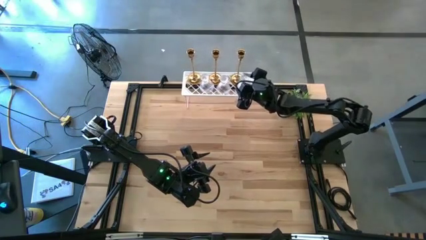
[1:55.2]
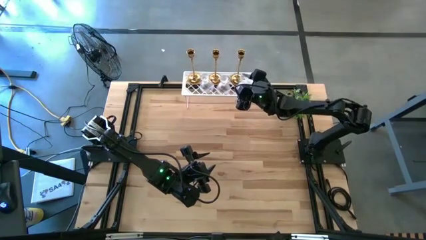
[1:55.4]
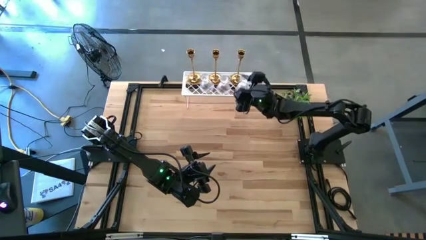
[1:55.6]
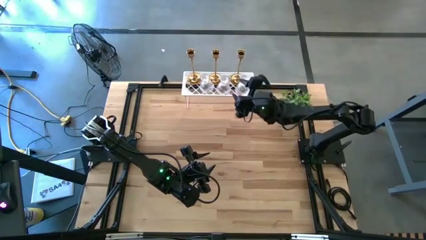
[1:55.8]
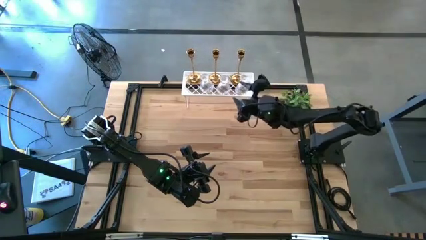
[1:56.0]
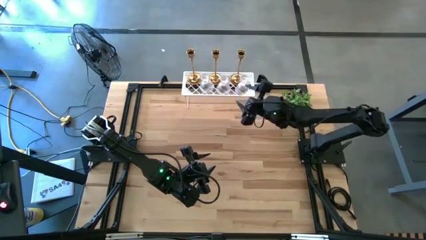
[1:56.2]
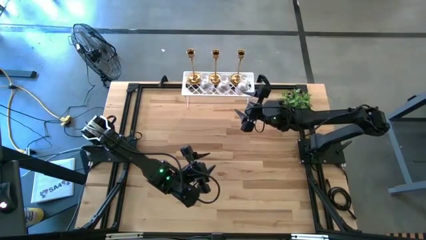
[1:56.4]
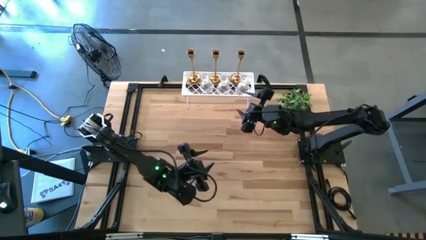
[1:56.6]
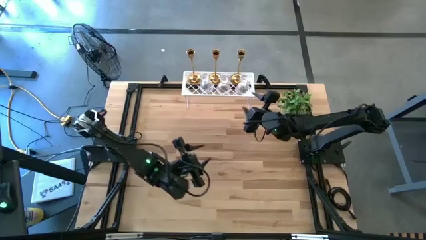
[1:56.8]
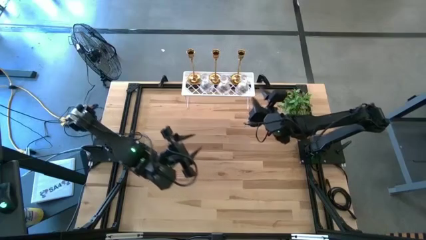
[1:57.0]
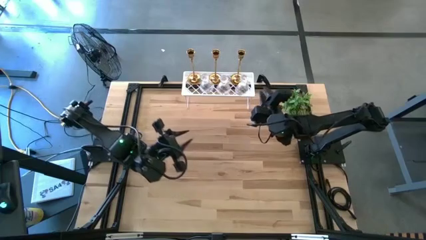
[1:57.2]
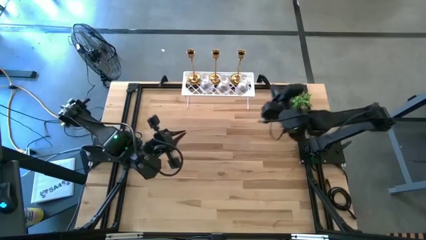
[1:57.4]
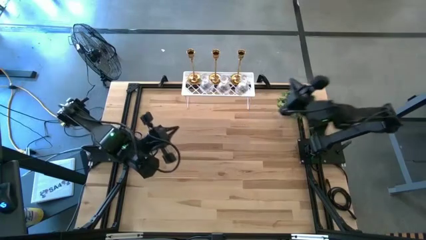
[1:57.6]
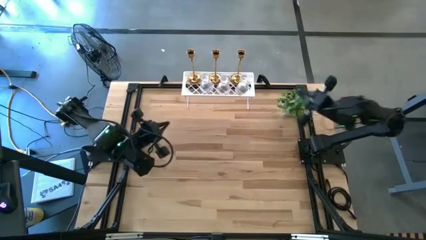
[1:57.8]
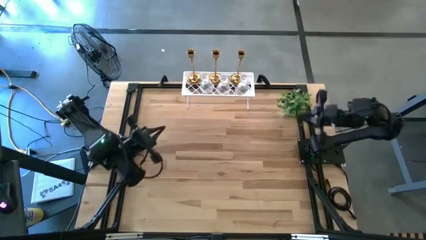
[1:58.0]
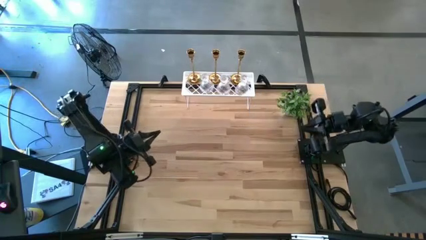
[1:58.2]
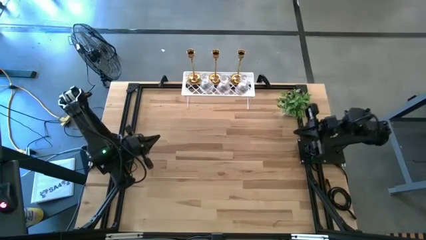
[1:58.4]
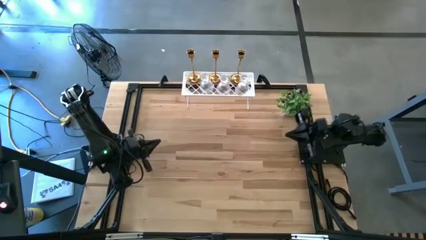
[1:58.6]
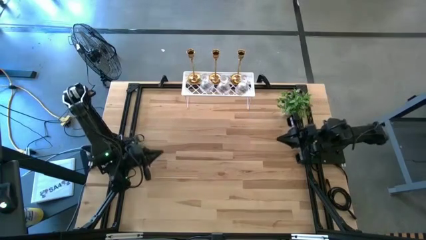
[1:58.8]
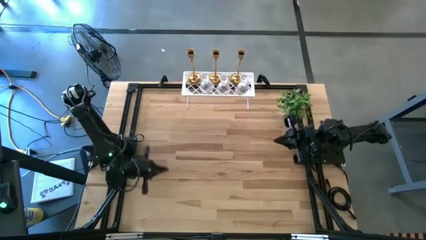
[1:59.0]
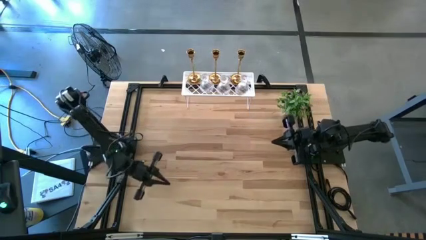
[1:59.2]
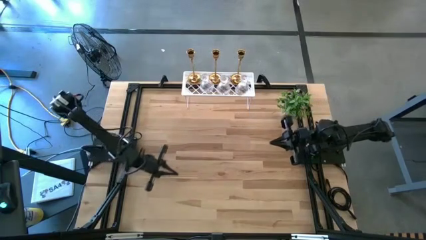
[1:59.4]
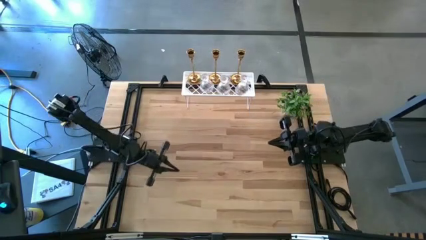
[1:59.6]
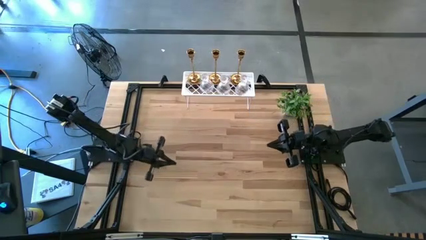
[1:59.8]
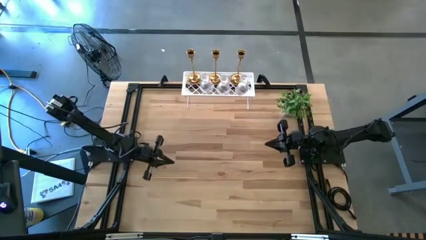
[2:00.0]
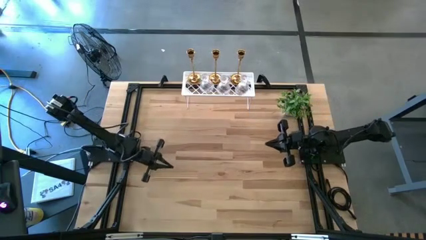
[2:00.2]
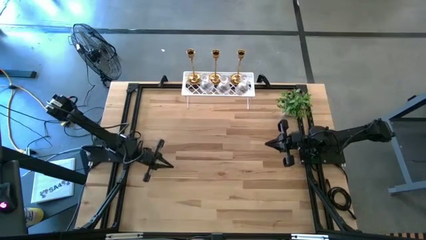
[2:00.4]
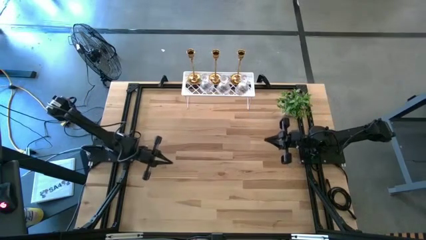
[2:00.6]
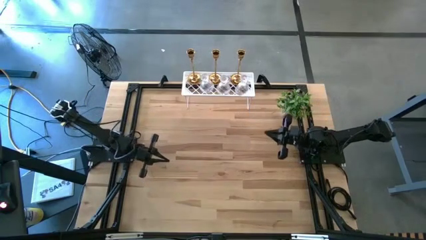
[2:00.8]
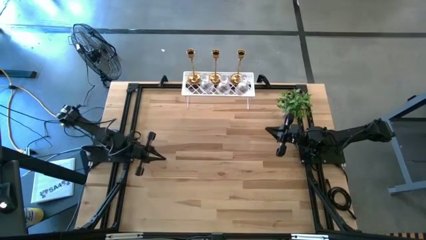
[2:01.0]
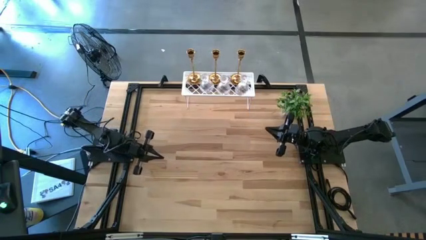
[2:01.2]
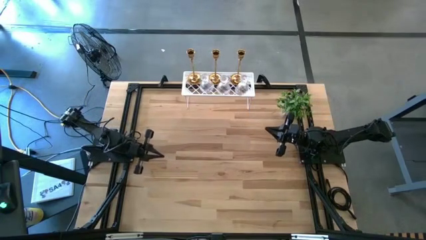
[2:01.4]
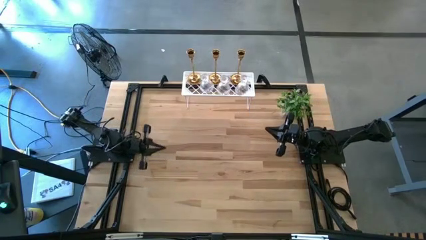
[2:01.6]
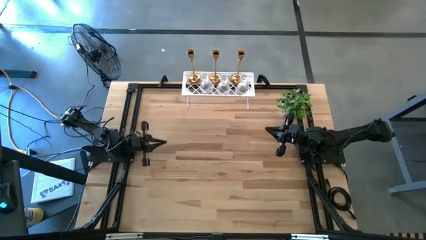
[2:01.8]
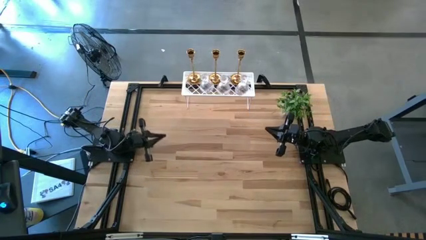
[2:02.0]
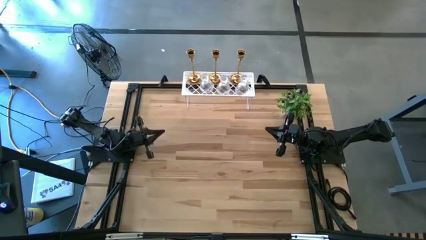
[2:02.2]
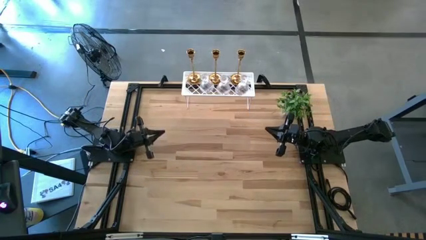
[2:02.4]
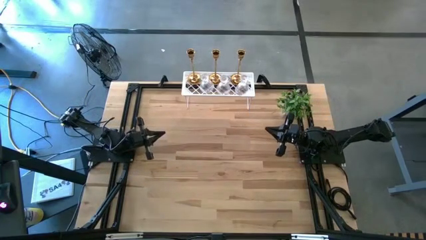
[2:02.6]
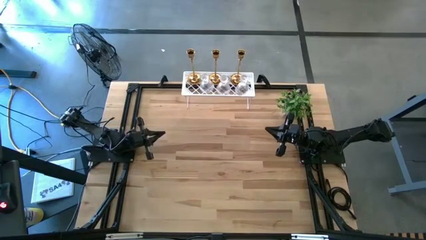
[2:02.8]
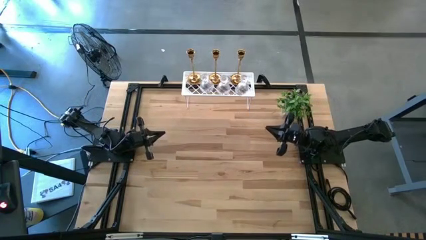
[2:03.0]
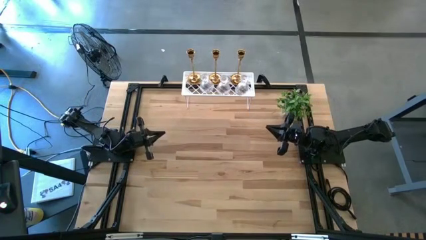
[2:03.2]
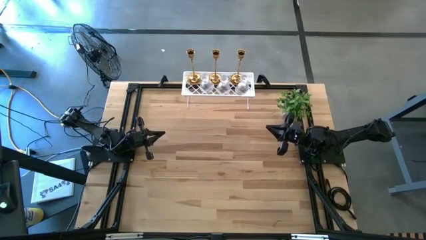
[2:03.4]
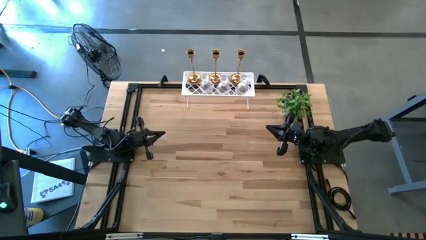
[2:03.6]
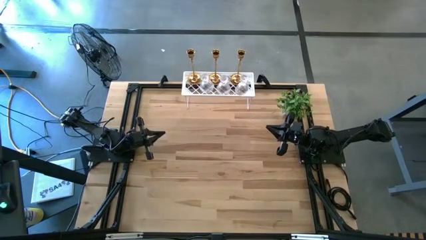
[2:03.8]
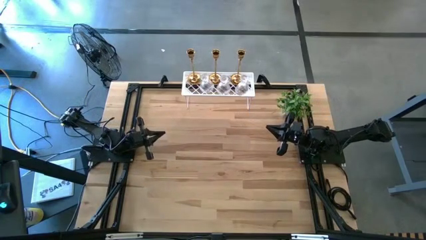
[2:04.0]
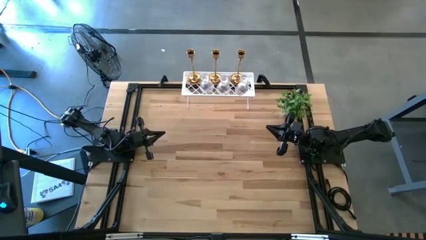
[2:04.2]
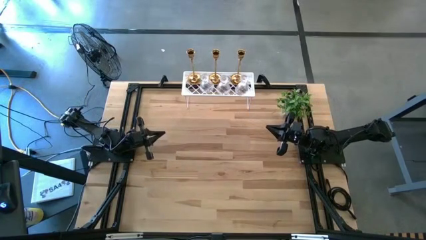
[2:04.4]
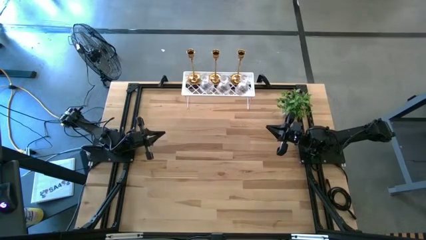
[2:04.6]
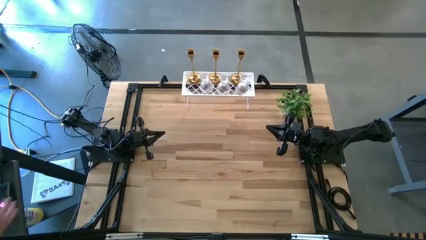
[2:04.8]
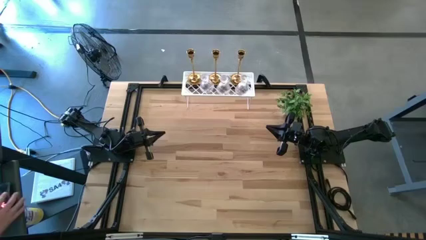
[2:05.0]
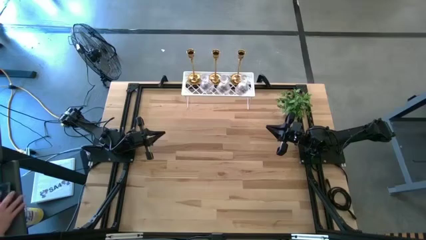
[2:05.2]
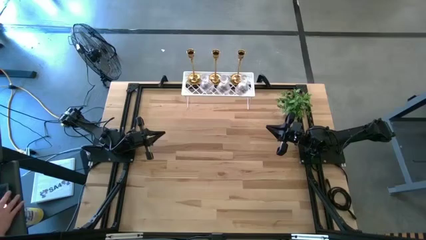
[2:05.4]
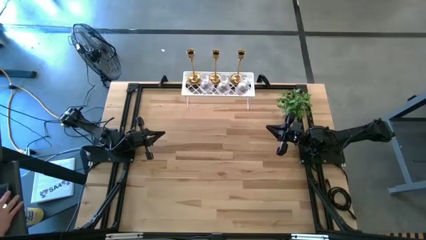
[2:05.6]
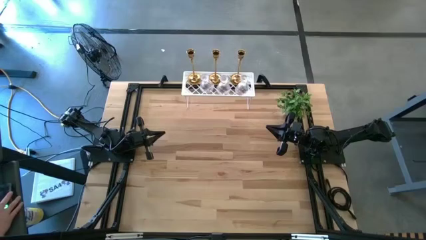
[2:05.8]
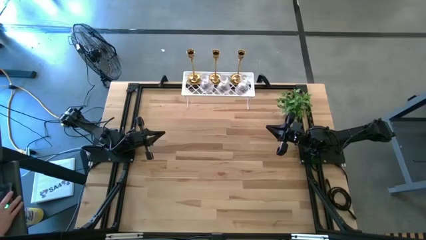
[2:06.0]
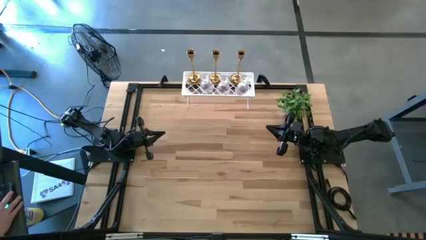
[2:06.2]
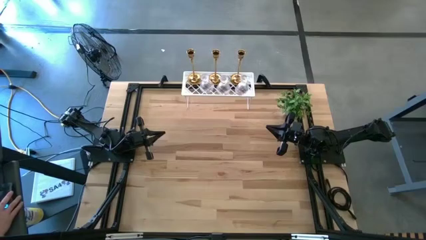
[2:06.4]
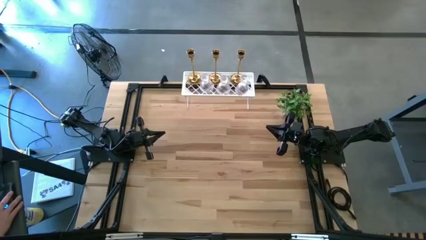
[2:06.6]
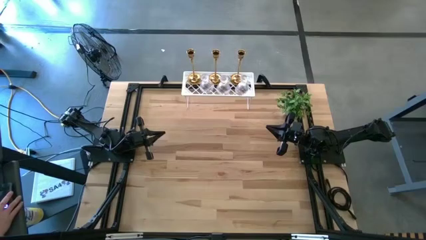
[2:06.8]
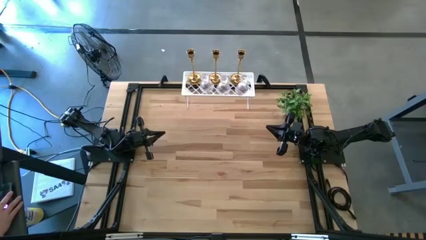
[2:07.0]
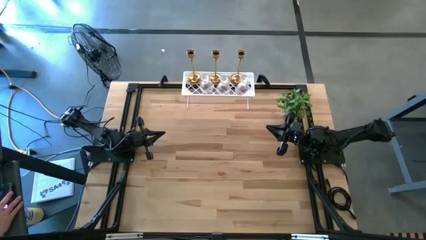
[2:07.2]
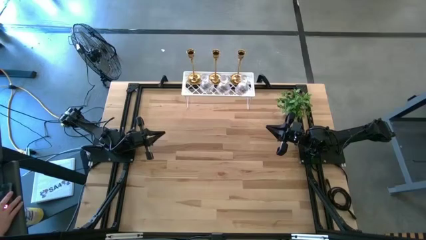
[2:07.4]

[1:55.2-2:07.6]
Task: Pick & Place candle stick holders
Return to Home Position

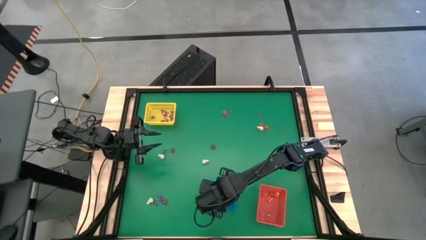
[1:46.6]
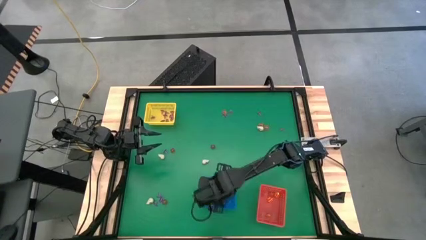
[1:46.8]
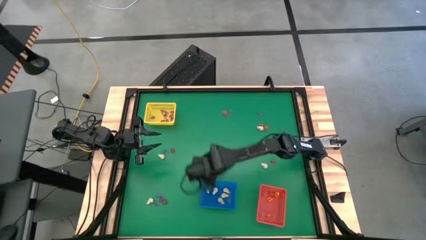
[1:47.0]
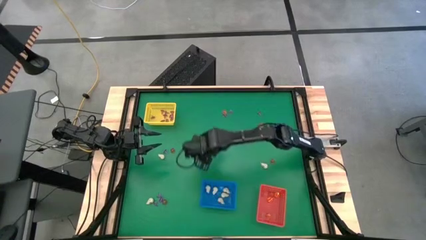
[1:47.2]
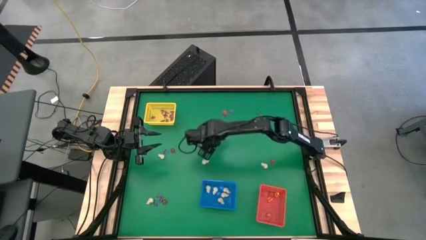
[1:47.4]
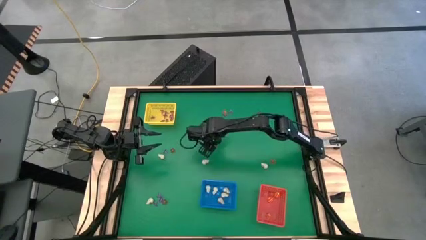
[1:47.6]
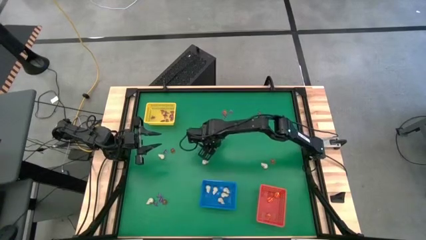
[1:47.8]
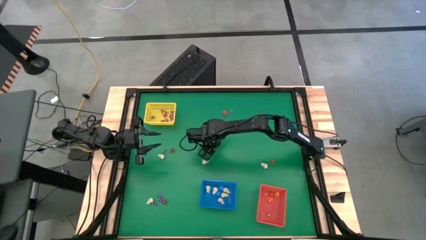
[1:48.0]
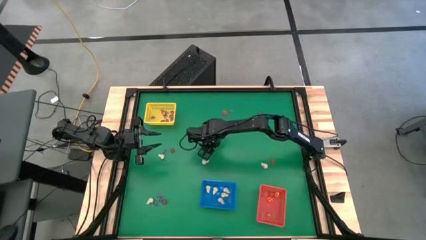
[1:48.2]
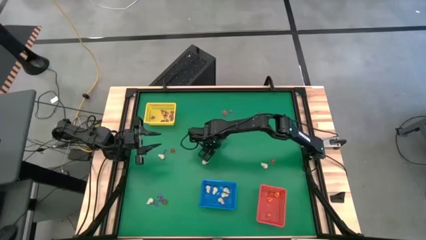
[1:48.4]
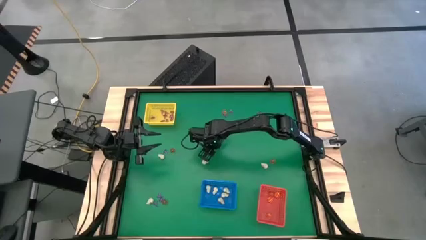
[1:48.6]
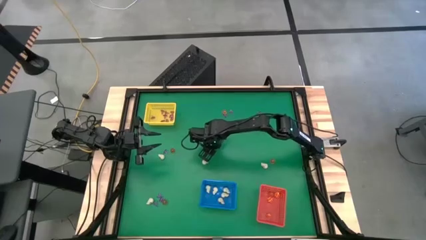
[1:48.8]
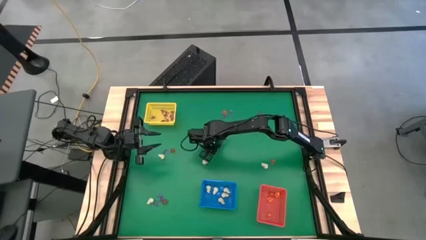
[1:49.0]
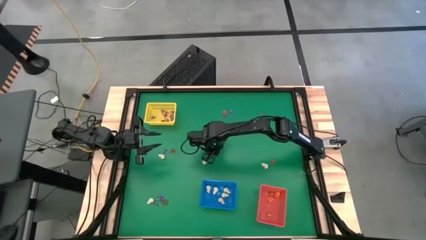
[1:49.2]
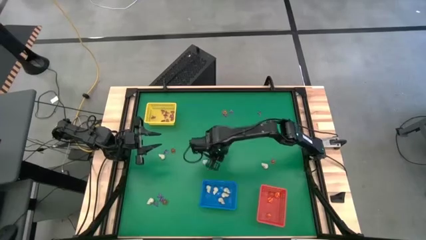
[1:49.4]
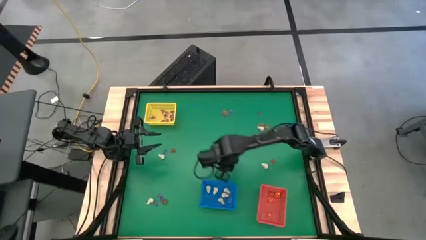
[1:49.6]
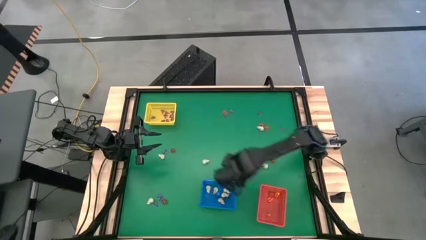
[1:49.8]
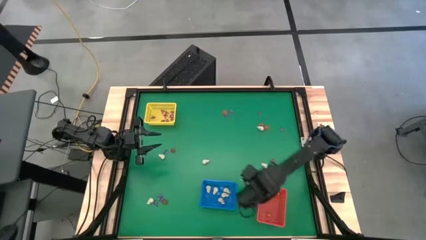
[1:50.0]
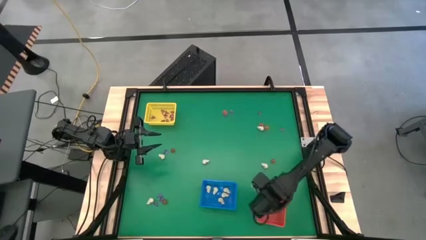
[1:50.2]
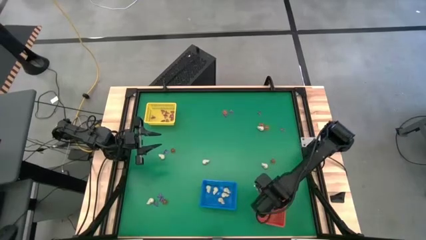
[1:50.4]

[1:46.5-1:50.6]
Task: Sort Halloween decoration
Put the orange pumpkin toy into the orange basket
